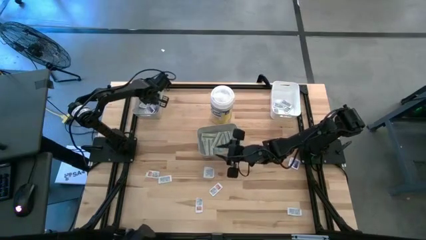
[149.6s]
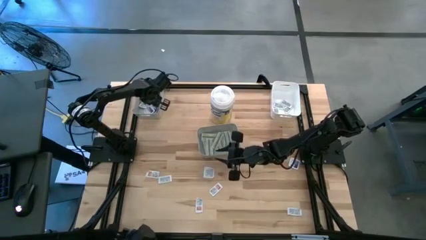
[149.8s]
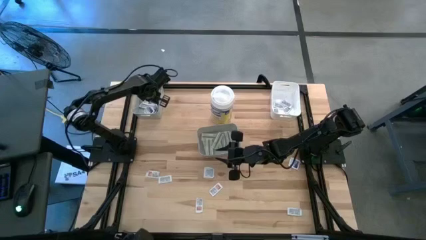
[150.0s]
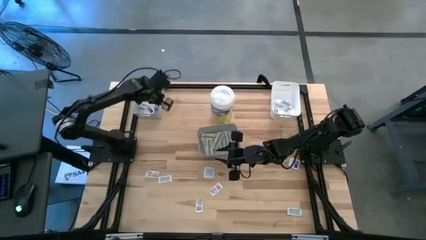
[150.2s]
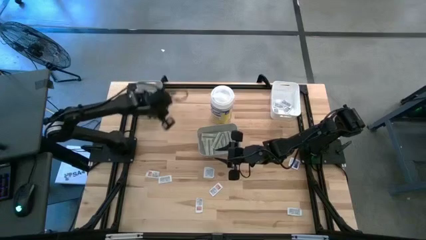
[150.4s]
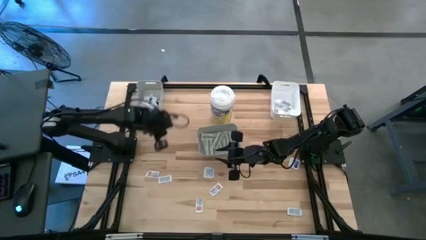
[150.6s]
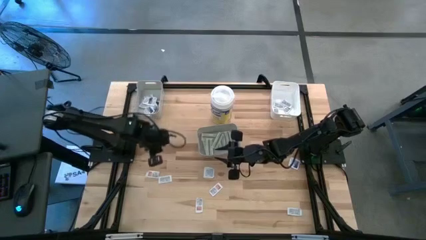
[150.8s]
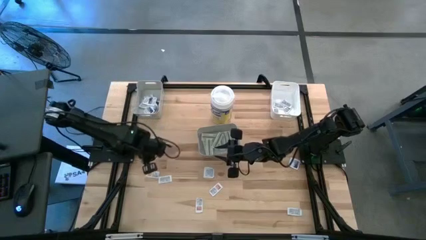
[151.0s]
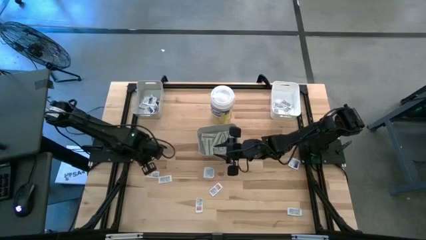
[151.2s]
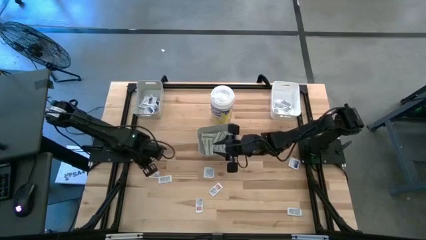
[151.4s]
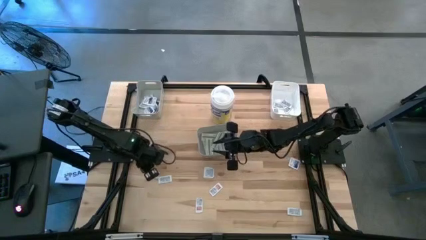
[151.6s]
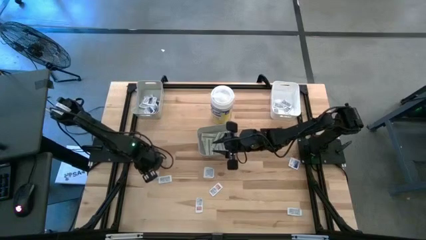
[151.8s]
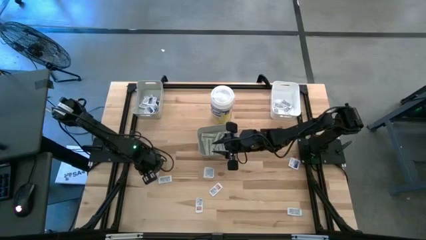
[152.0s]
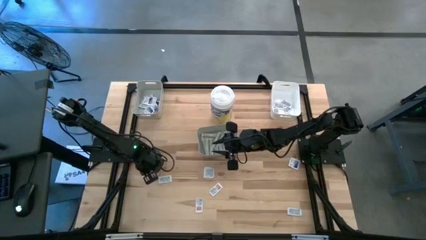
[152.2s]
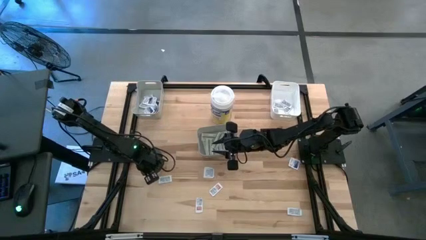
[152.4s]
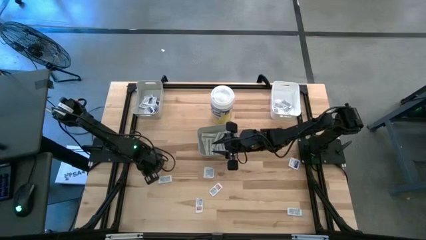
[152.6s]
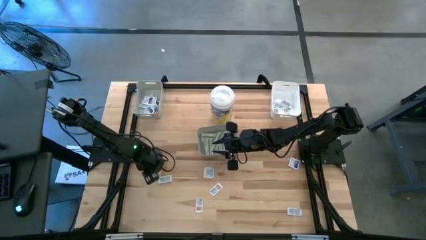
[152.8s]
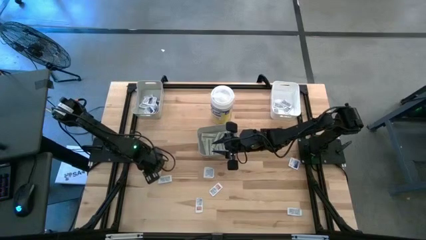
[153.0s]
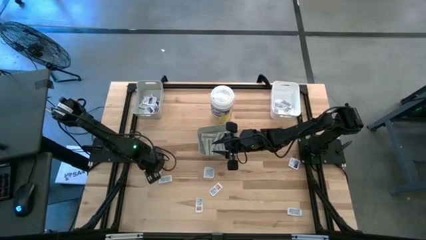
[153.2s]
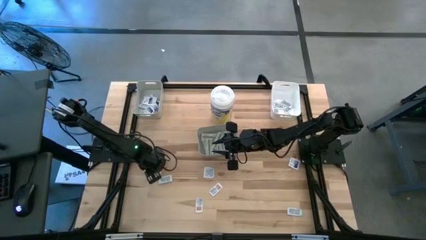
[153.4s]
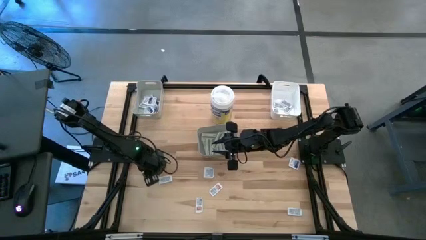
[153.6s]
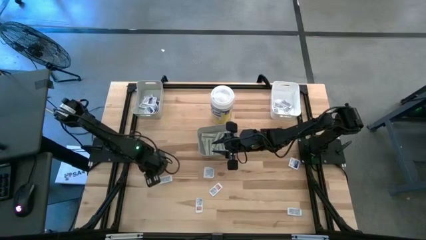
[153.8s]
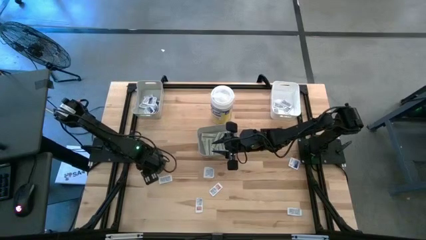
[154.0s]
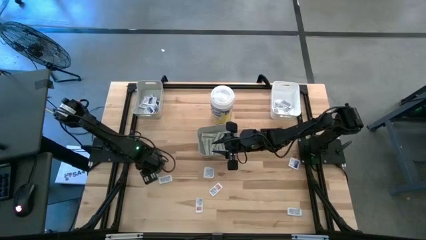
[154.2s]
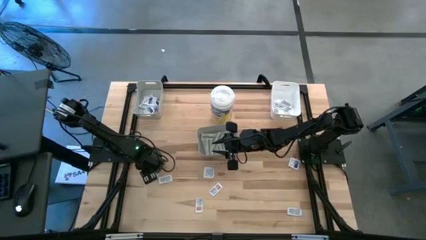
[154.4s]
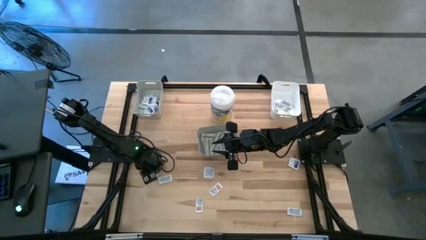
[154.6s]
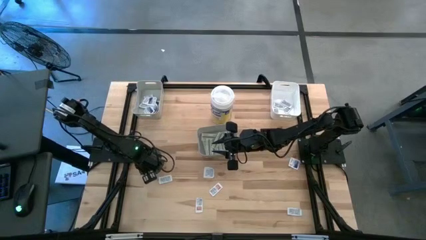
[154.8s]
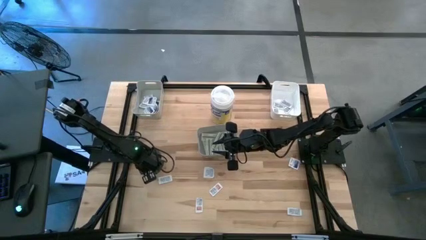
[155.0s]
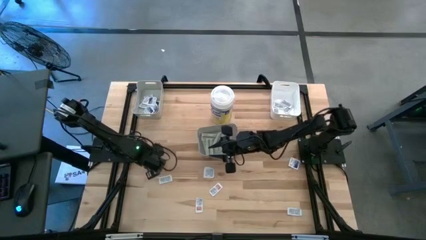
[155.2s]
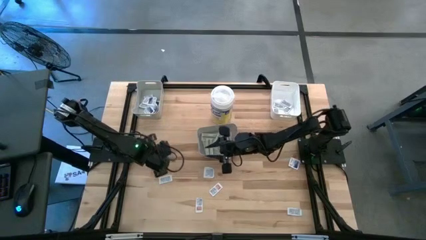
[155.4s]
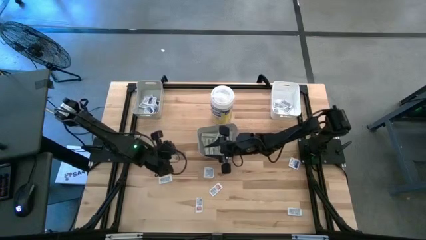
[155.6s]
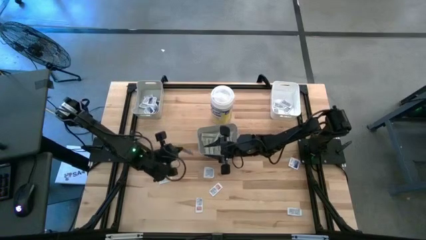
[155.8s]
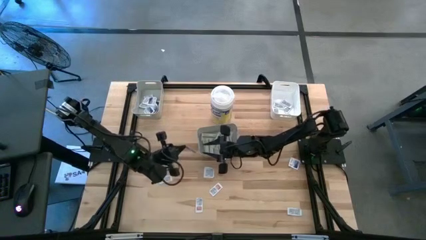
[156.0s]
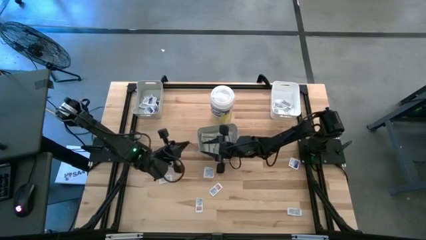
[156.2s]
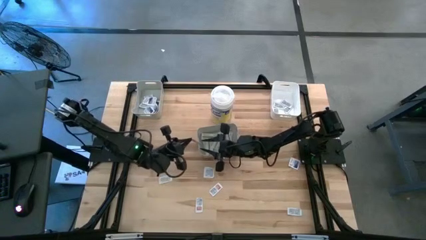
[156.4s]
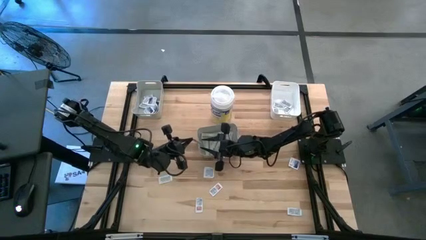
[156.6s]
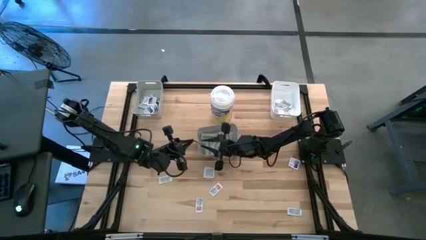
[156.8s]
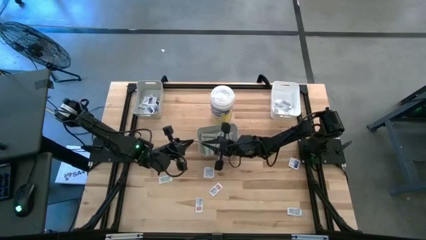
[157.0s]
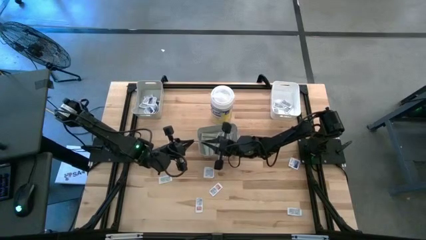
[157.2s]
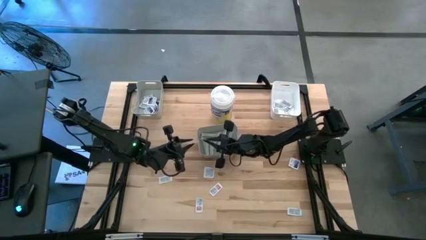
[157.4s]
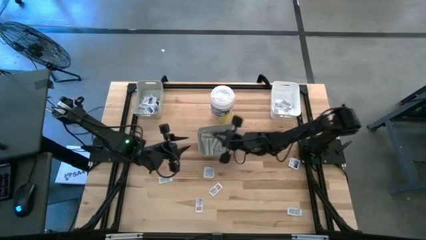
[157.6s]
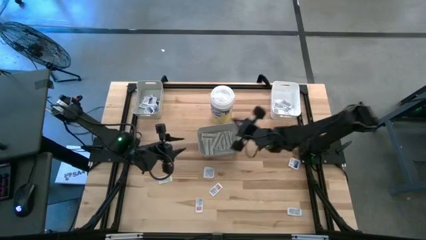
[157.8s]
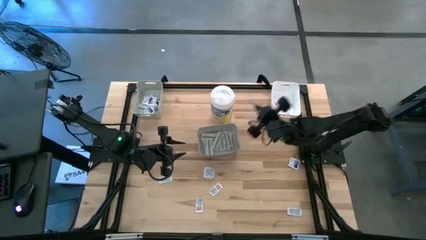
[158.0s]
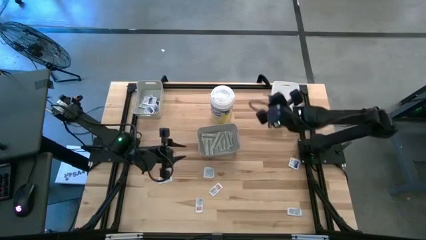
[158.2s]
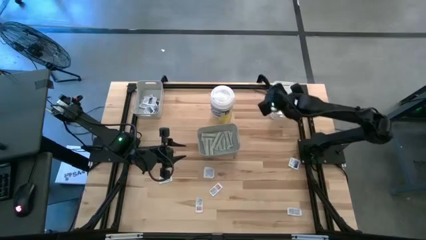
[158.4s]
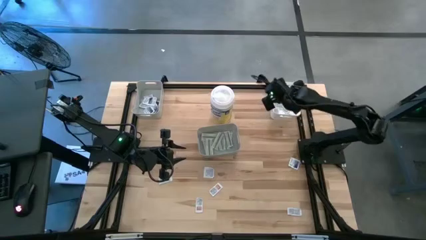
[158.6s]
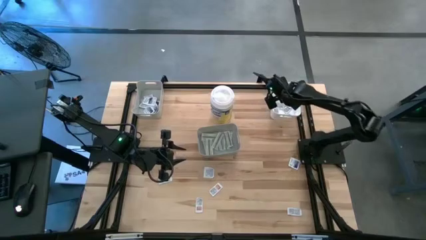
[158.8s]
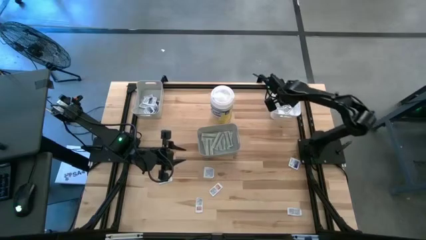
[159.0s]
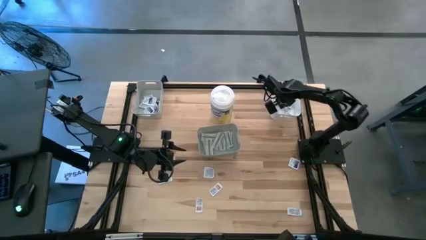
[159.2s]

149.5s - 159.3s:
Task: Pick & Place First Aid Supplies
Put the ointment pack into the white bin

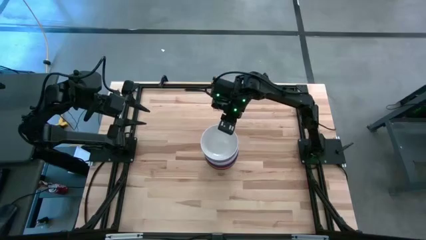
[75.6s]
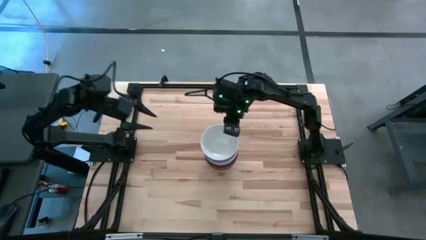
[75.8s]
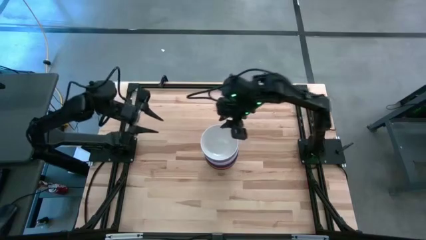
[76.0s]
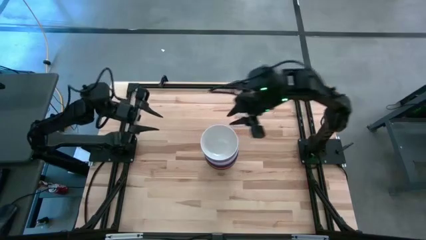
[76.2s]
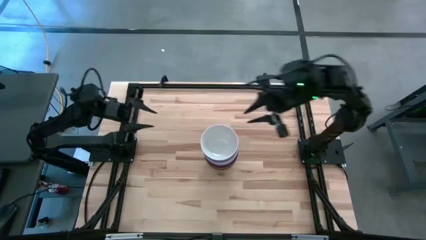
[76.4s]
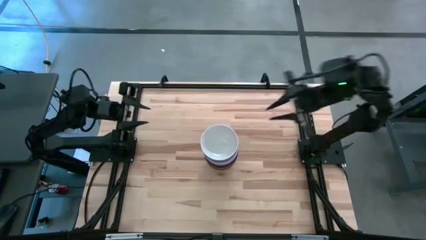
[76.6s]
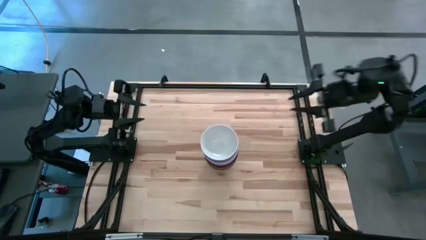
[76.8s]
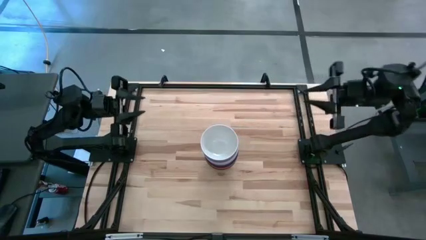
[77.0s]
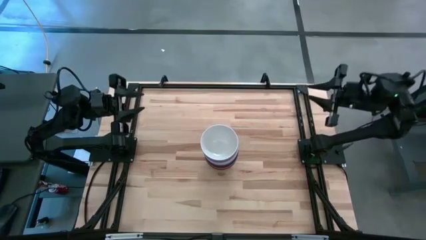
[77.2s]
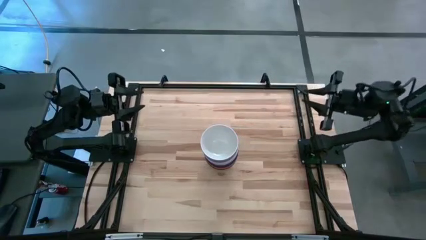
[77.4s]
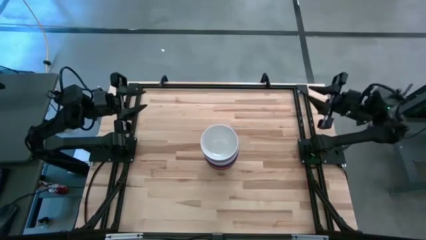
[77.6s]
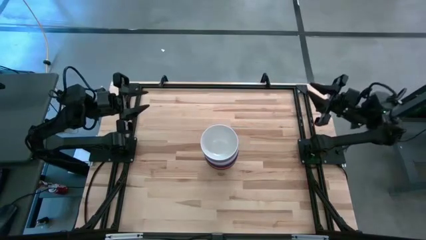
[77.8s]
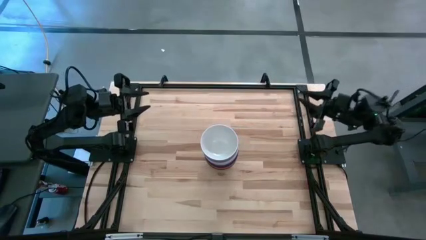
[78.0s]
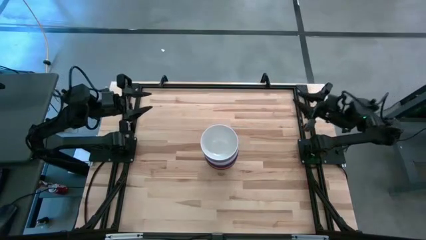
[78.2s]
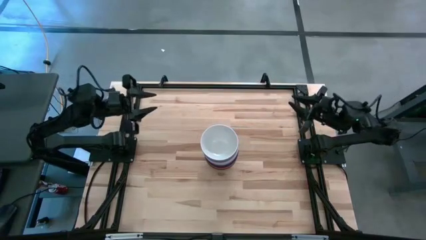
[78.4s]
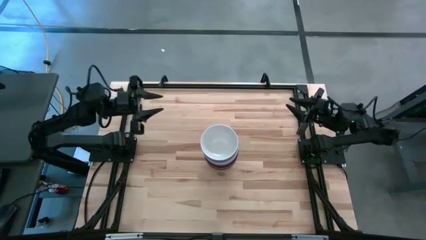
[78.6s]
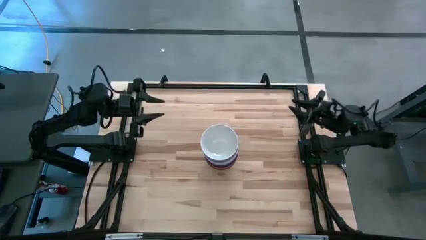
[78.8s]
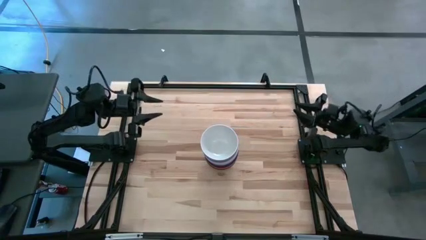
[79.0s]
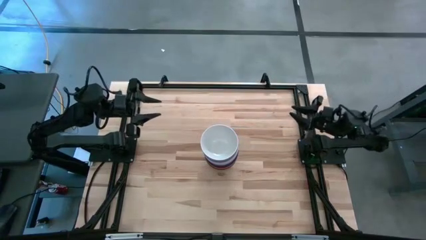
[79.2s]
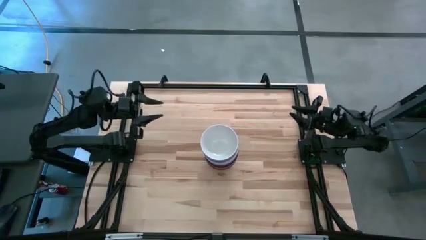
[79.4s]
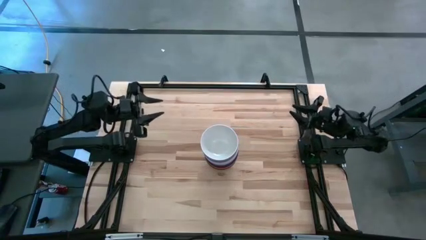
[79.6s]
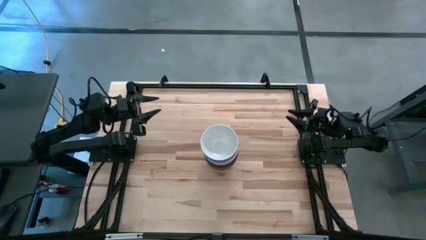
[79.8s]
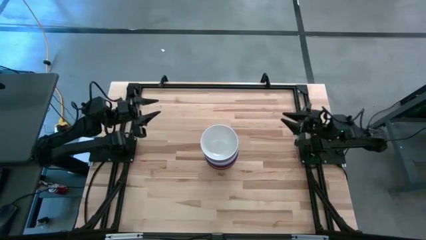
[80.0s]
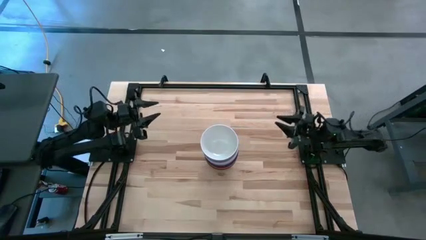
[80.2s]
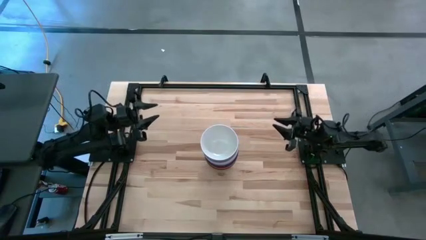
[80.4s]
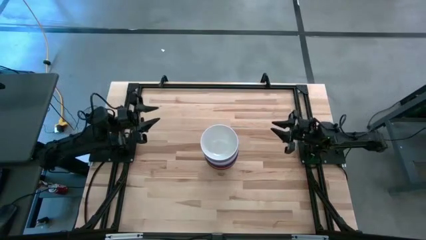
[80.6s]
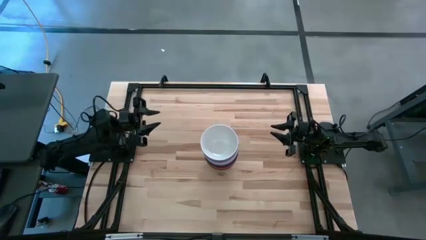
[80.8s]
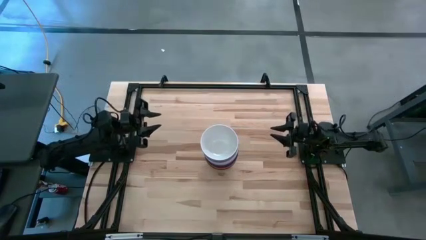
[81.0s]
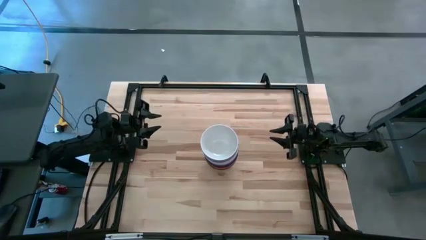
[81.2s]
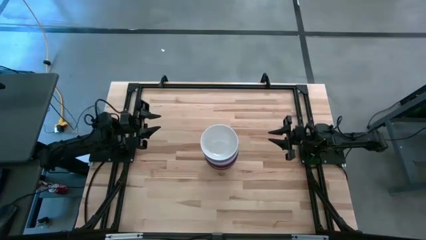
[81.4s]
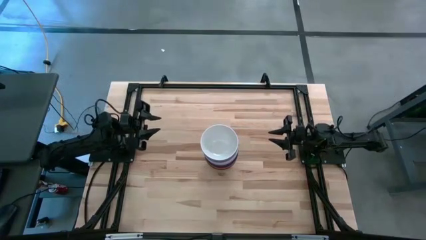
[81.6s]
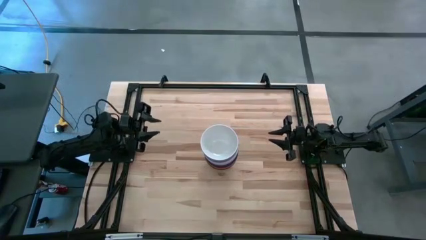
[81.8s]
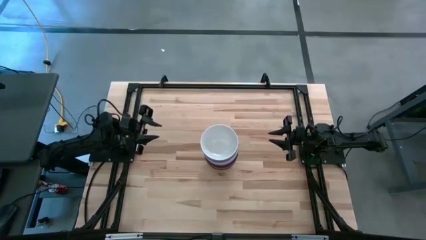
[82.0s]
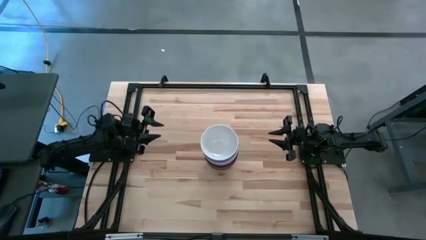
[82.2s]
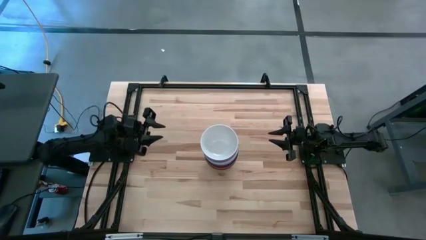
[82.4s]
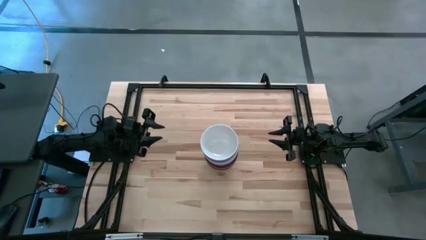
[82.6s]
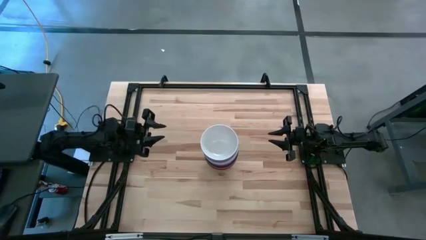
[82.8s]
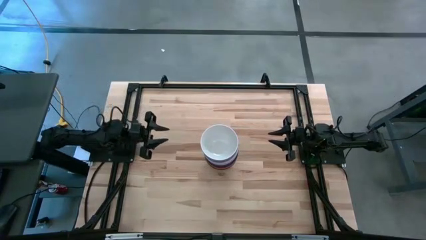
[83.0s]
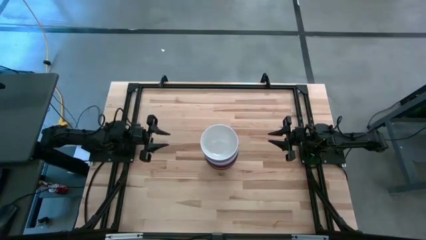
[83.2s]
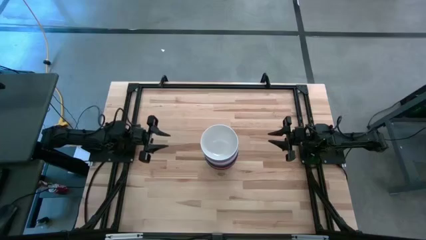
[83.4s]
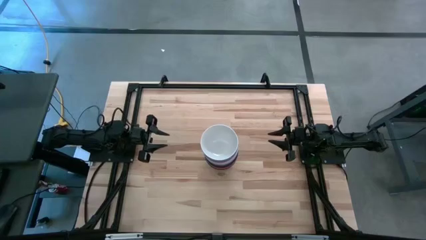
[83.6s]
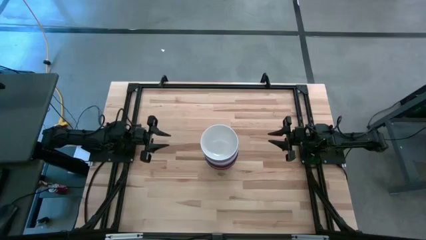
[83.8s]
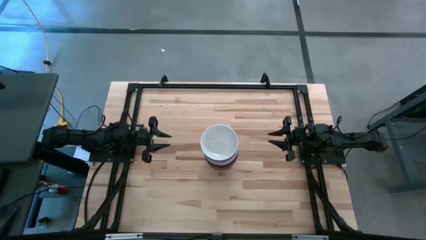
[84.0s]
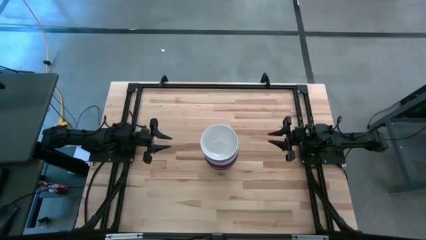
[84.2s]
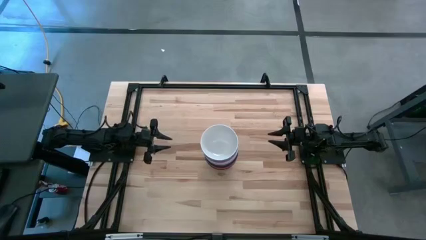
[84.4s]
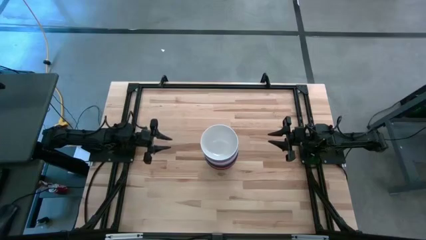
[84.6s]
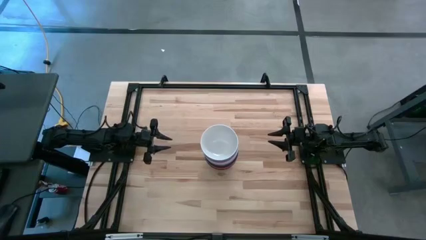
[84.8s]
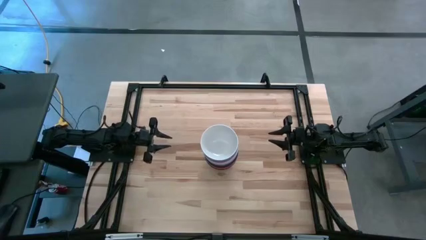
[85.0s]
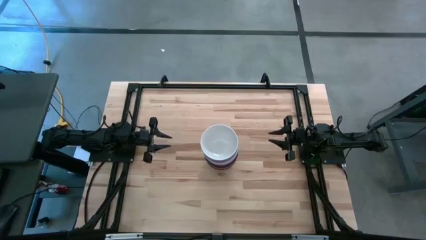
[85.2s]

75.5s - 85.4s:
Task: Nest bowls inside each other
Return to Home Position
